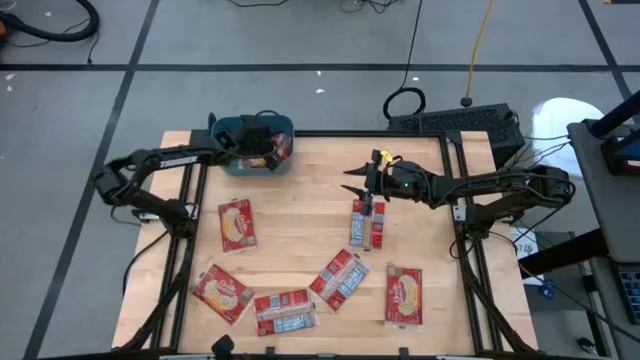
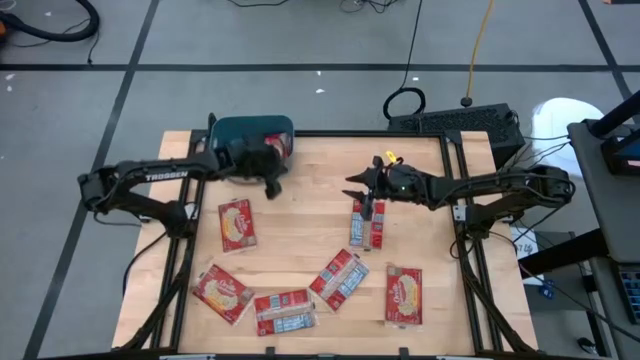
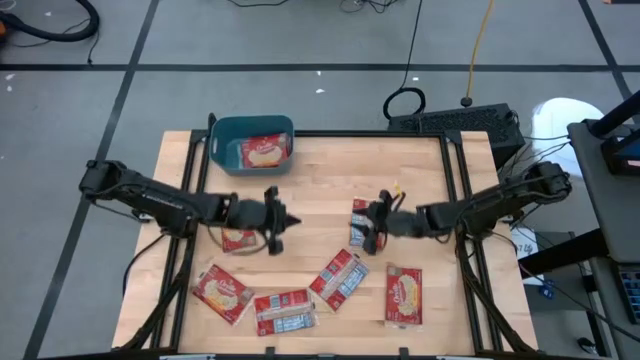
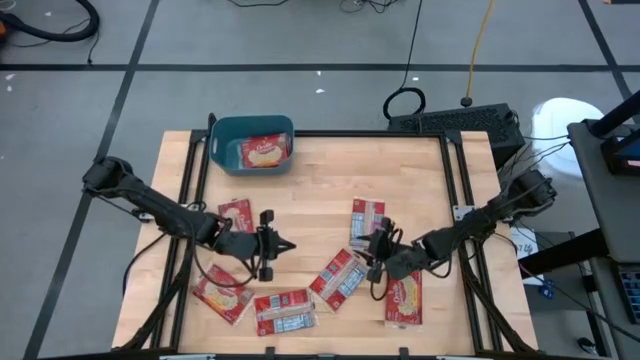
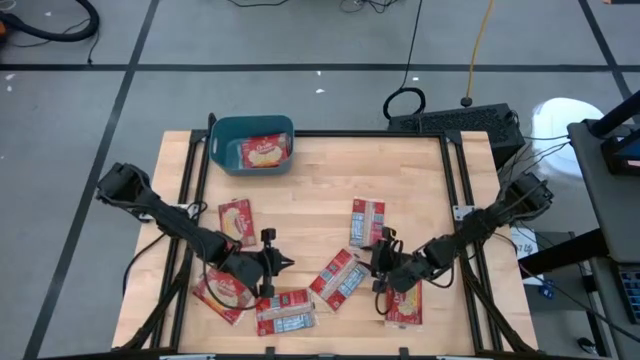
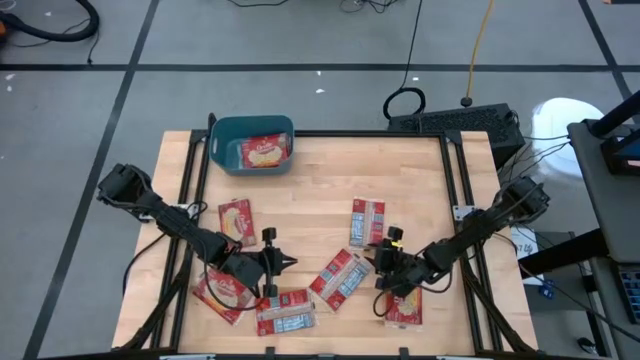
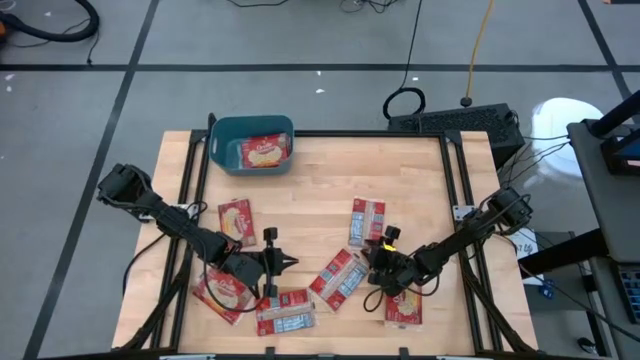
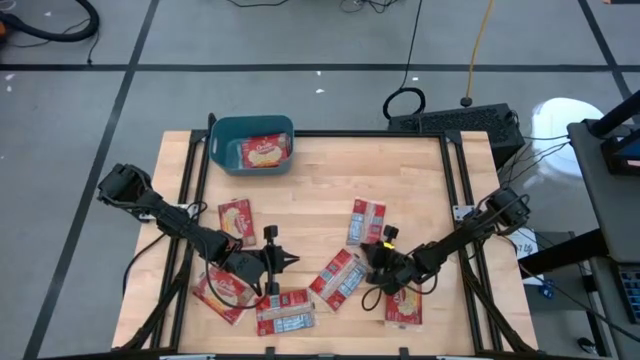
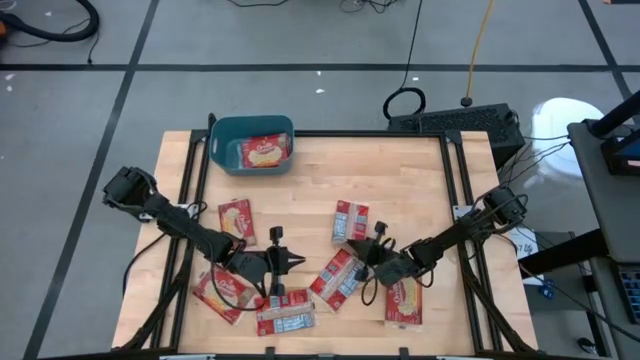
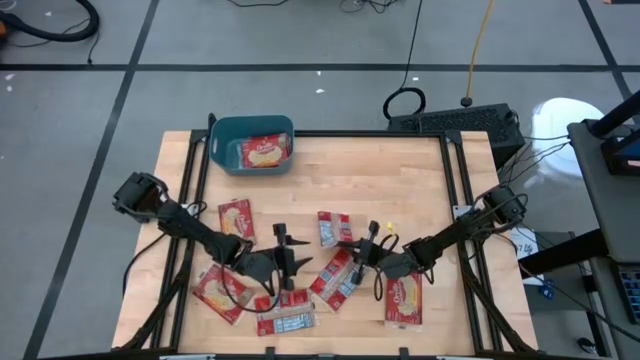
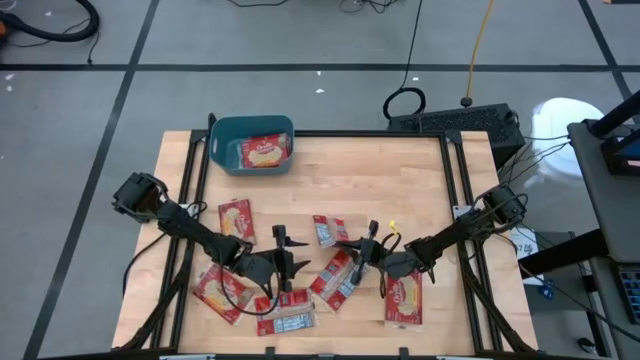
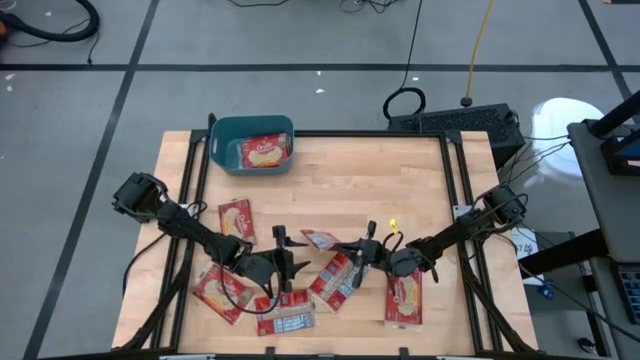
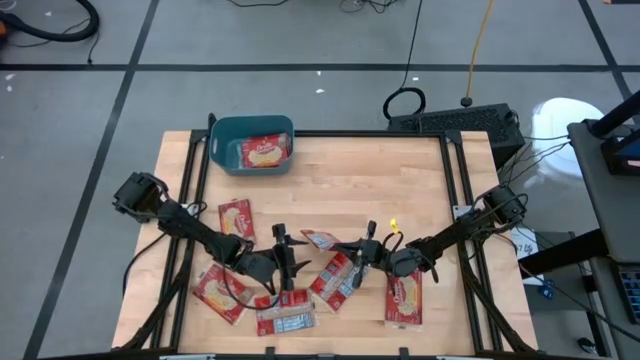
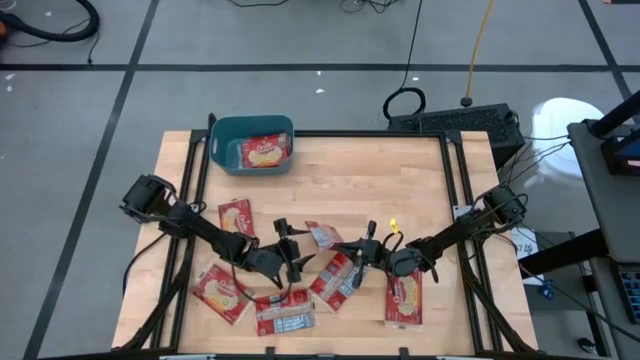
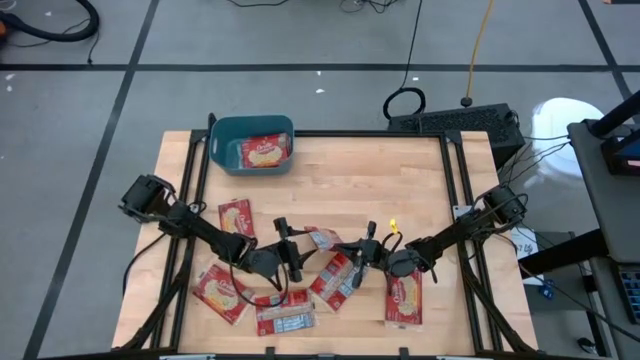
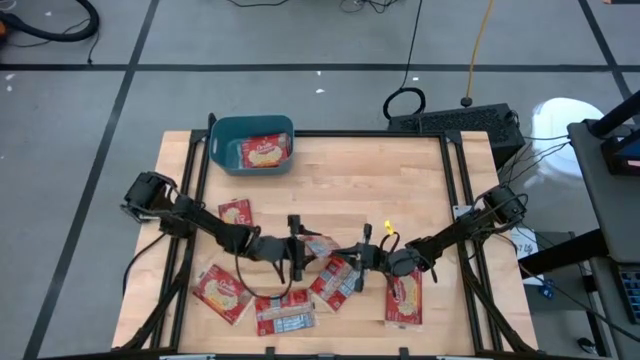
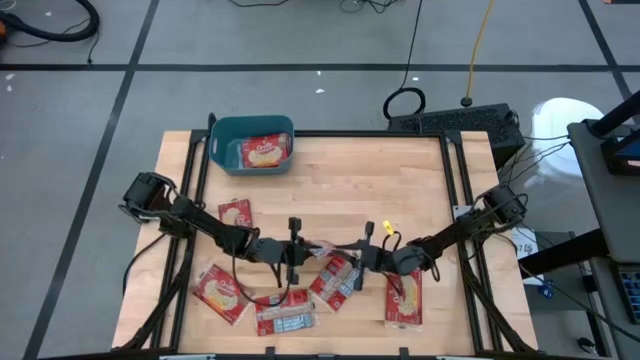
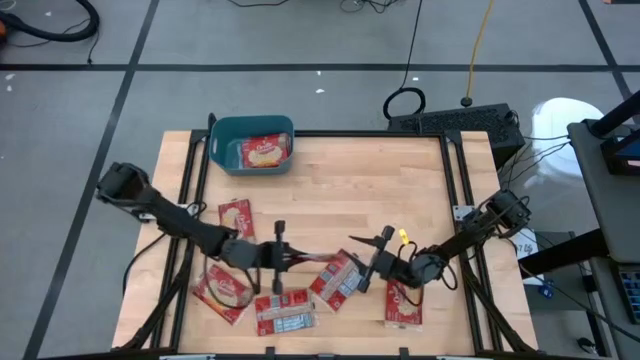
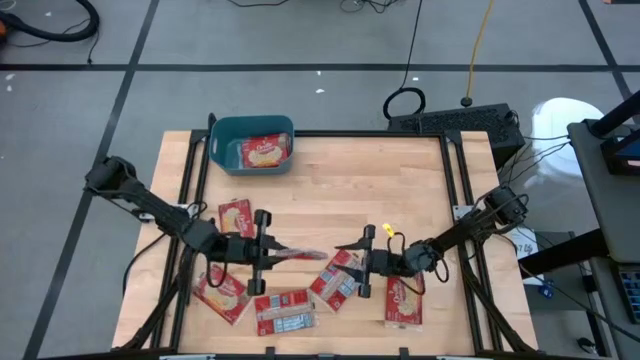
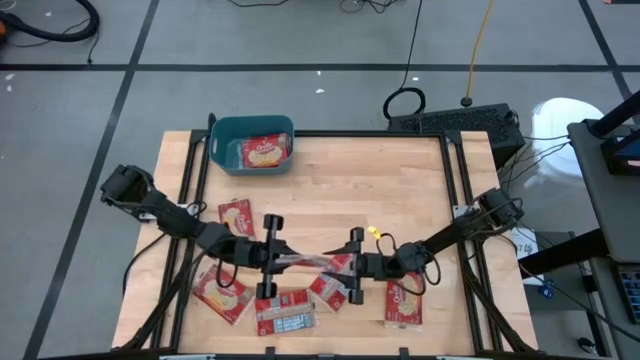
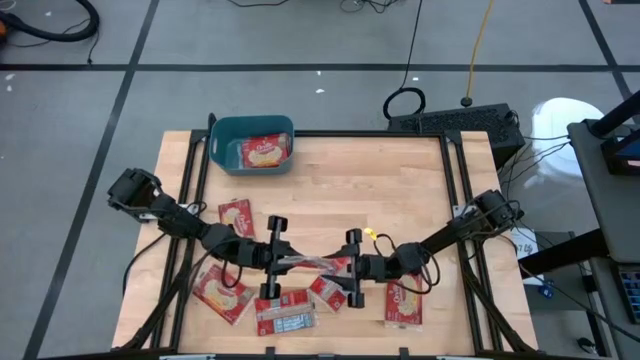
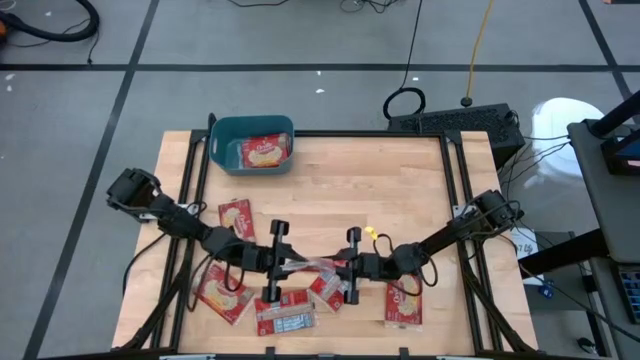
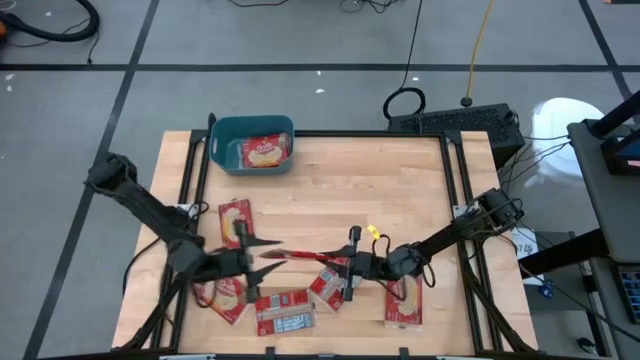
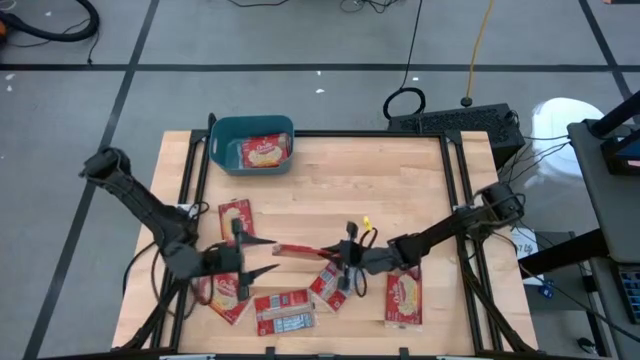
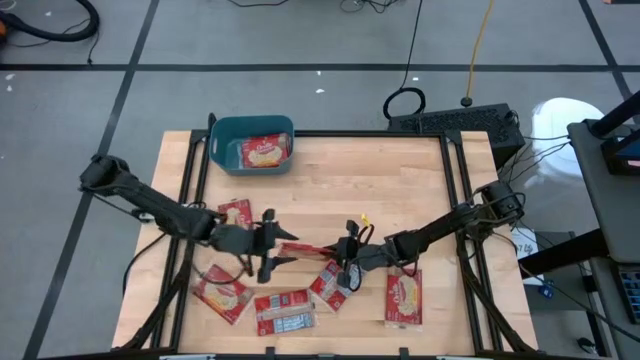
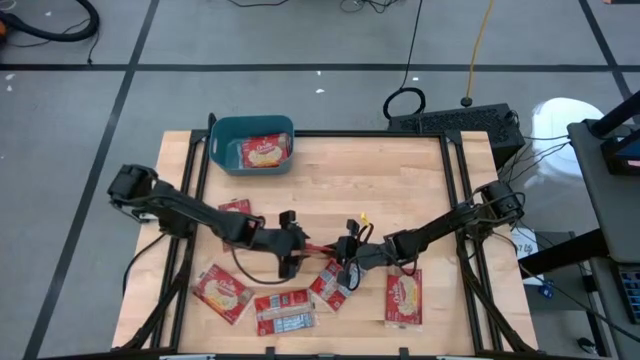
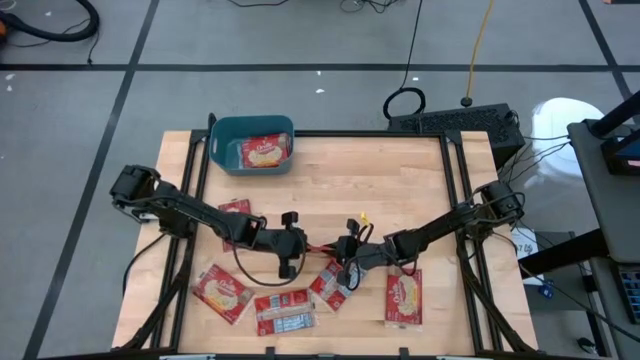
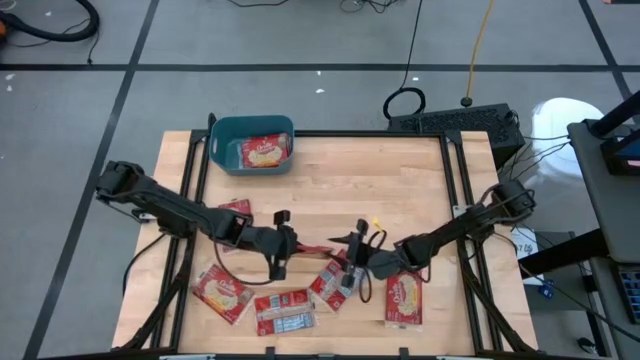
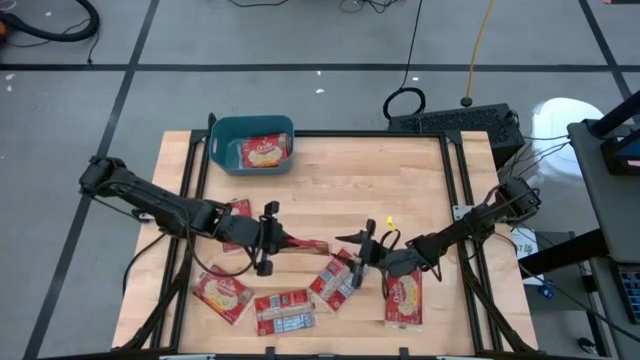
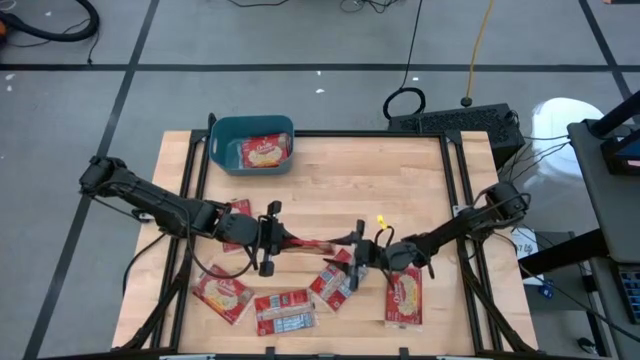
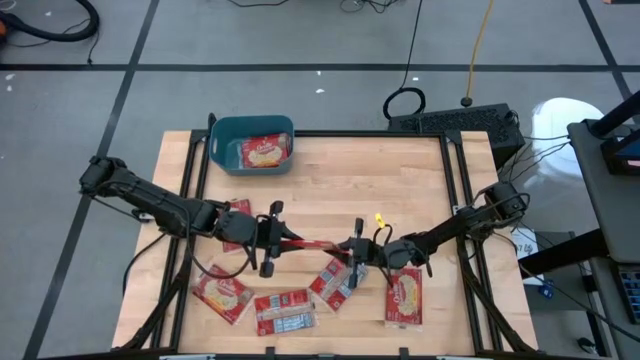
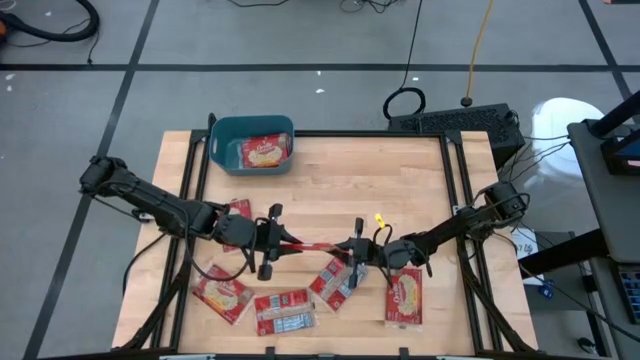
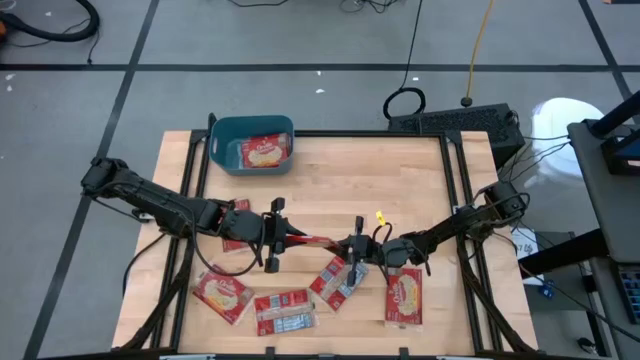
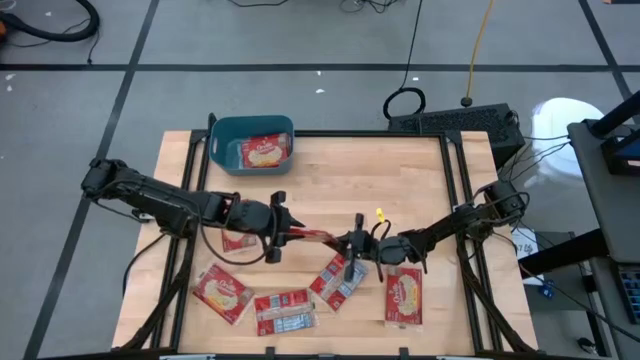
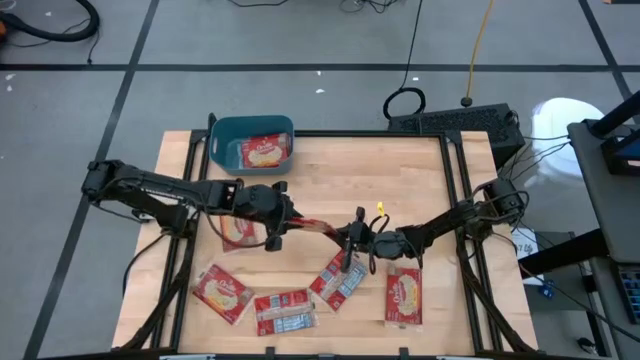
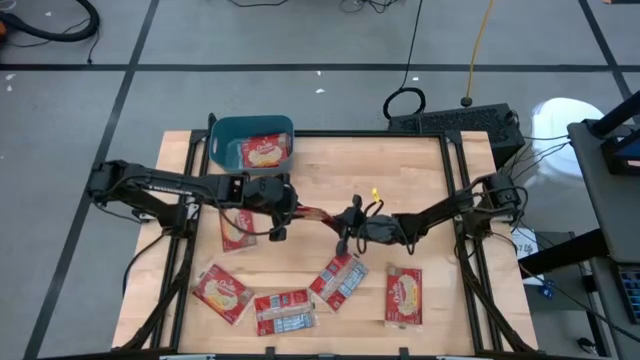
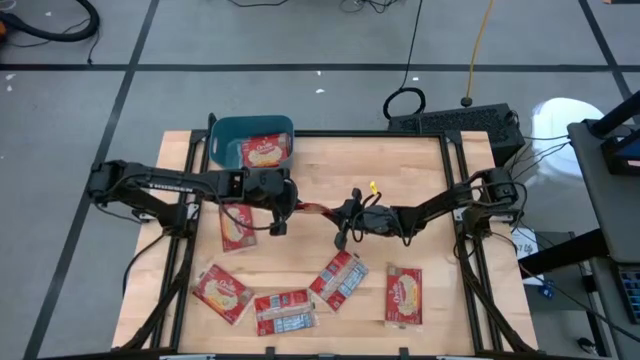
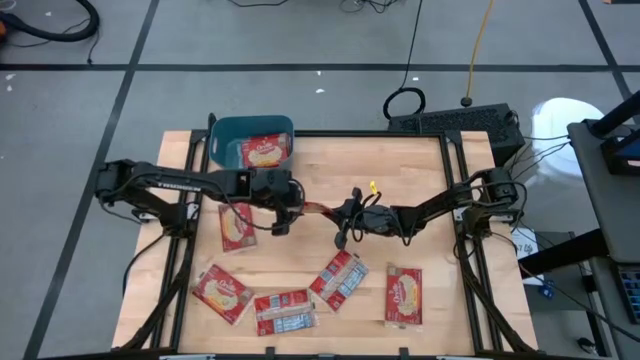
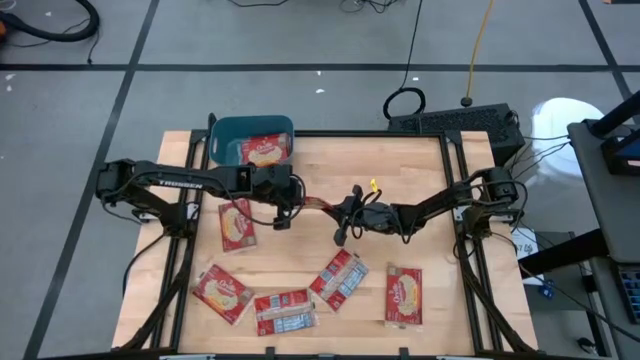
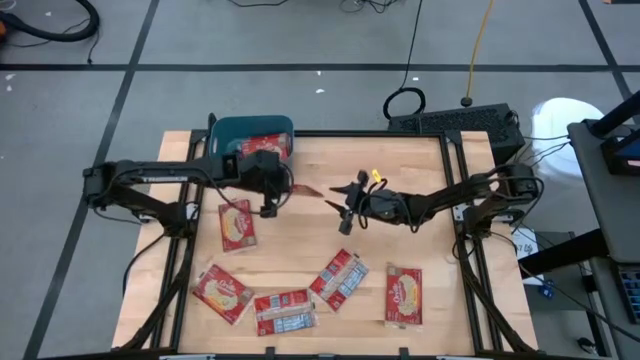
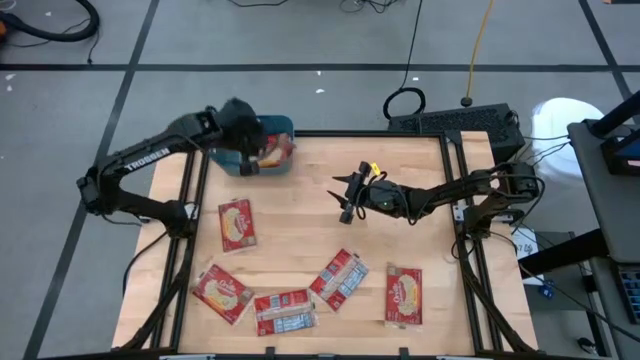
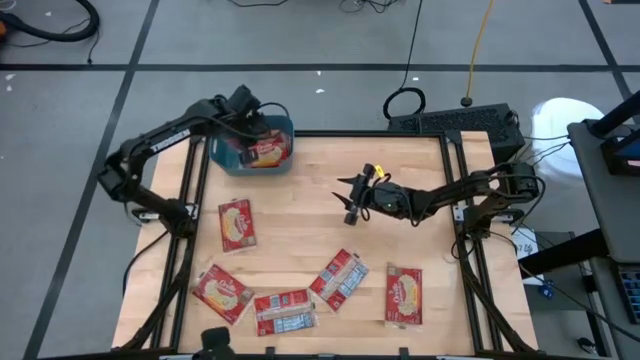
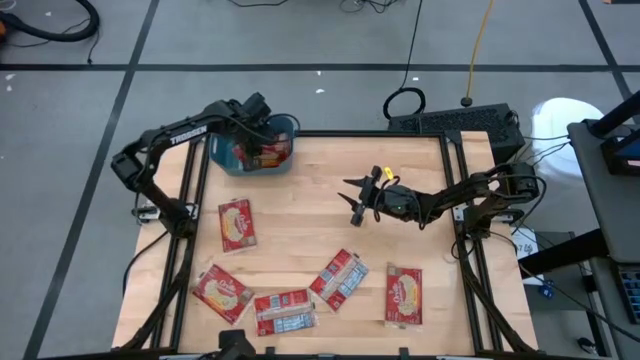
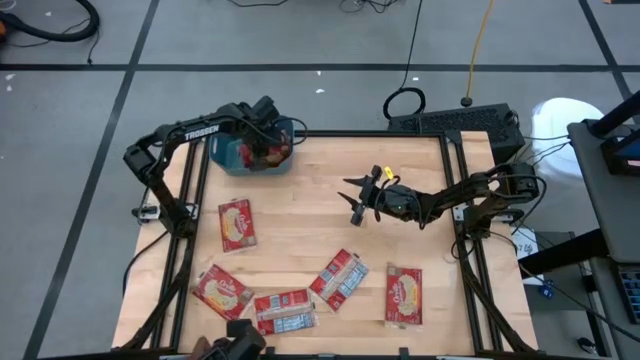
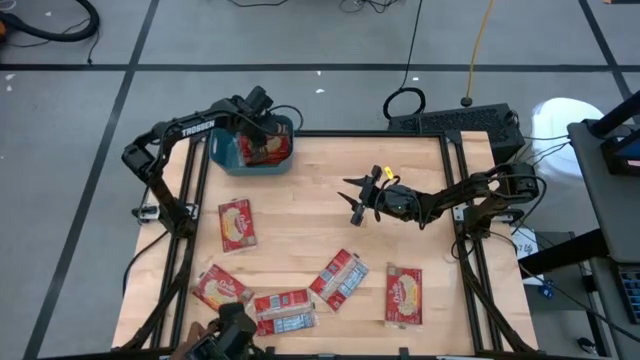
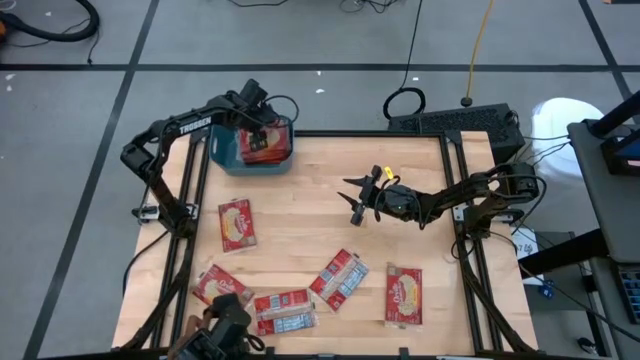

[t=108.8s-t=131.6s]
Task: Sort popcorn bags into baskets
Put the red popcorn bag into the blue bin
